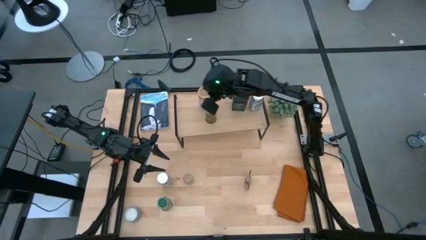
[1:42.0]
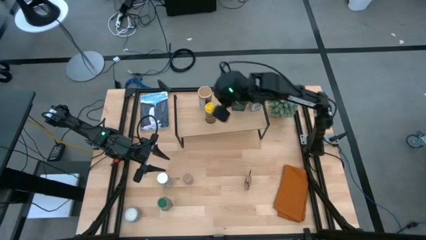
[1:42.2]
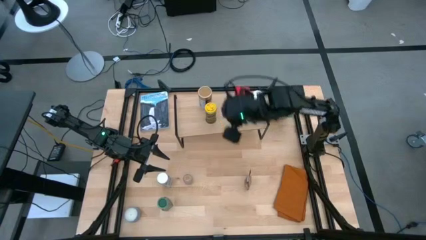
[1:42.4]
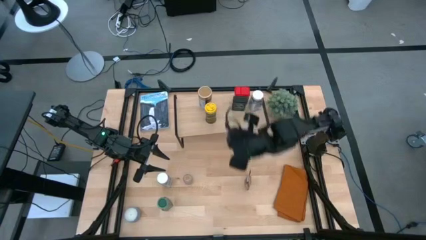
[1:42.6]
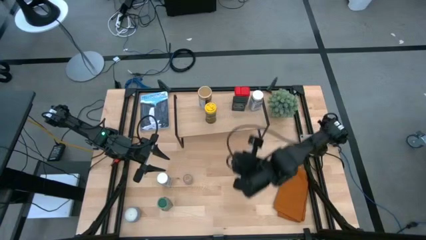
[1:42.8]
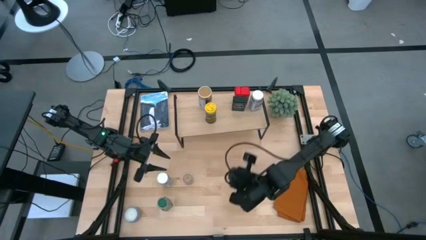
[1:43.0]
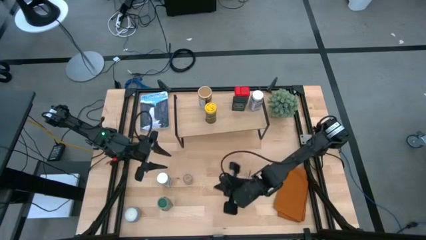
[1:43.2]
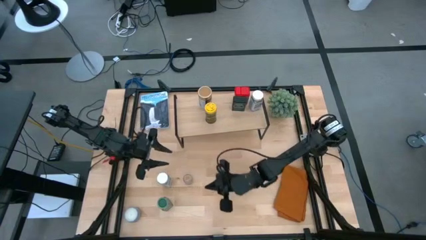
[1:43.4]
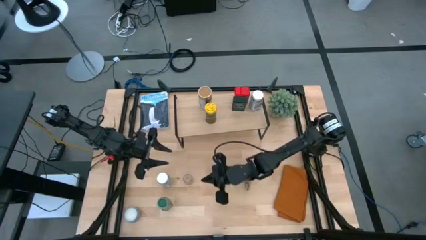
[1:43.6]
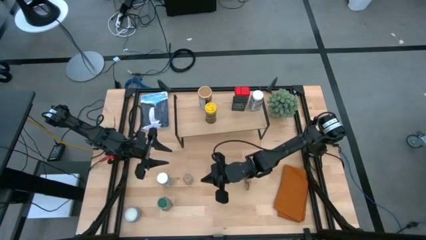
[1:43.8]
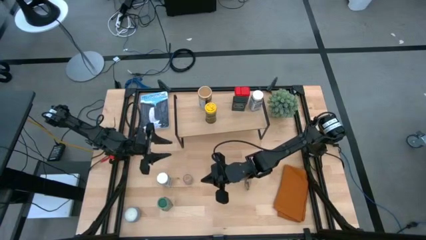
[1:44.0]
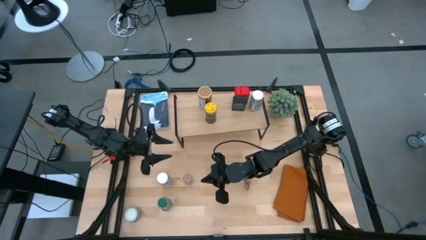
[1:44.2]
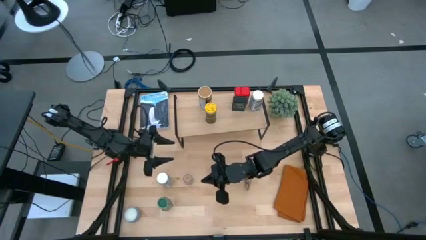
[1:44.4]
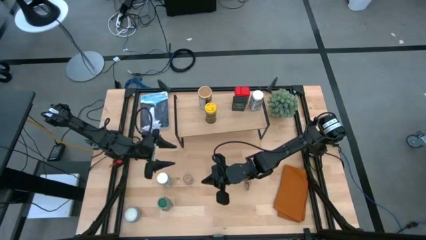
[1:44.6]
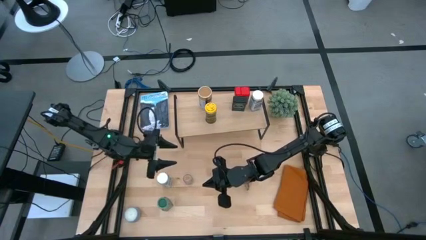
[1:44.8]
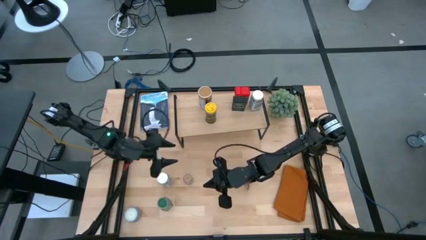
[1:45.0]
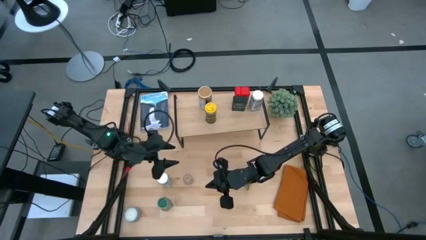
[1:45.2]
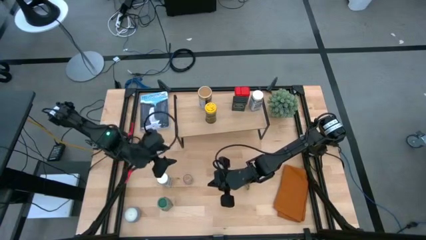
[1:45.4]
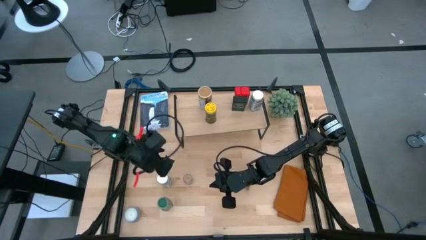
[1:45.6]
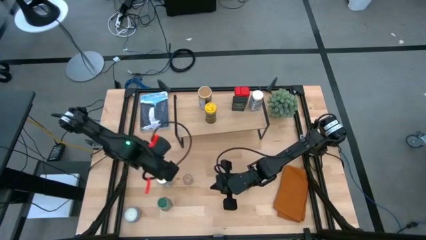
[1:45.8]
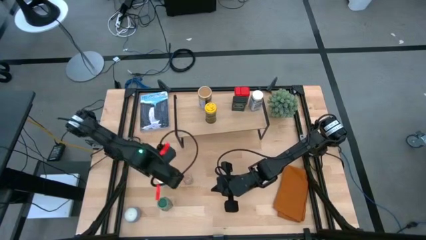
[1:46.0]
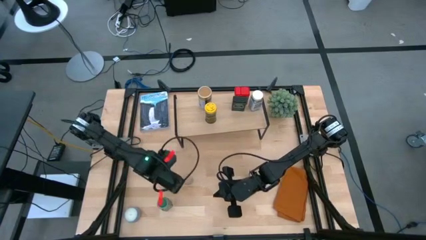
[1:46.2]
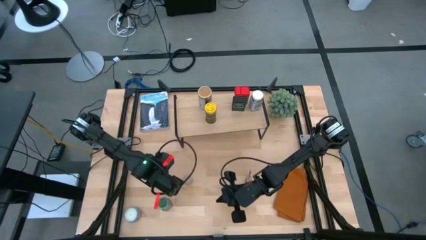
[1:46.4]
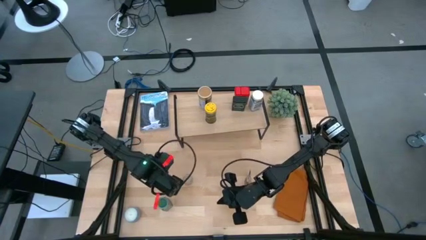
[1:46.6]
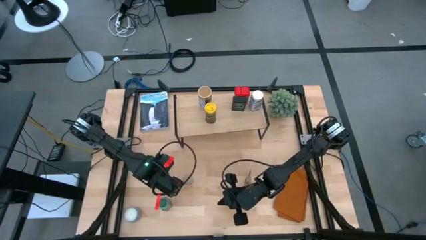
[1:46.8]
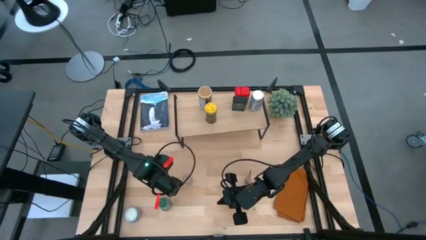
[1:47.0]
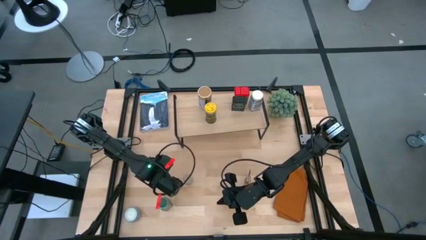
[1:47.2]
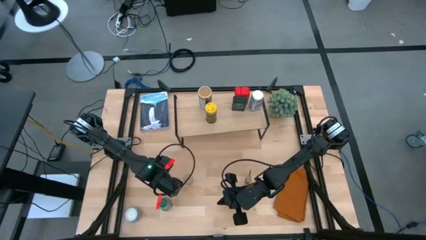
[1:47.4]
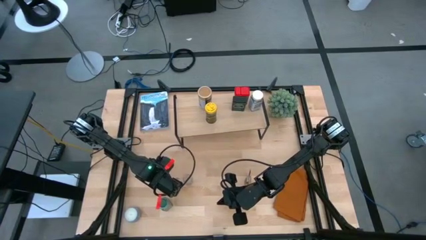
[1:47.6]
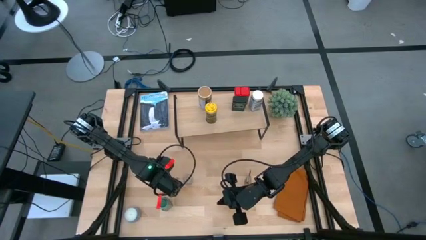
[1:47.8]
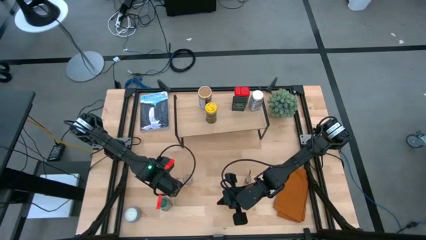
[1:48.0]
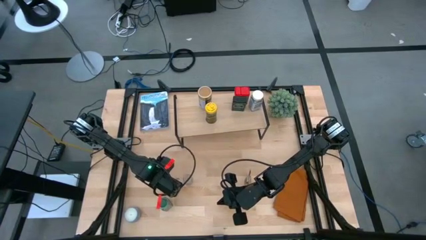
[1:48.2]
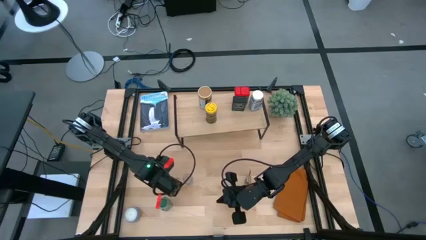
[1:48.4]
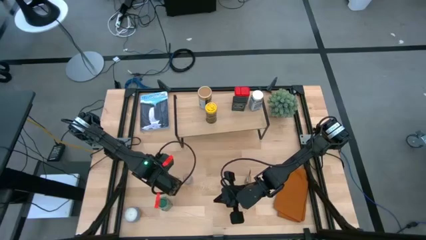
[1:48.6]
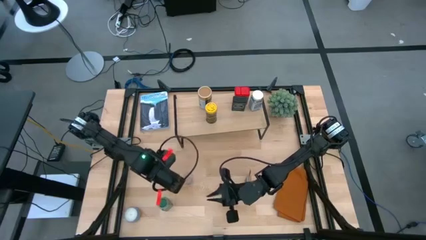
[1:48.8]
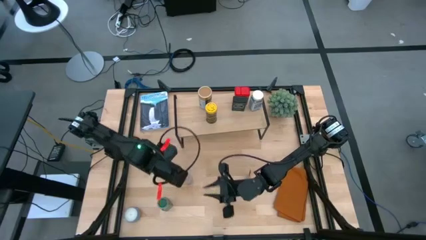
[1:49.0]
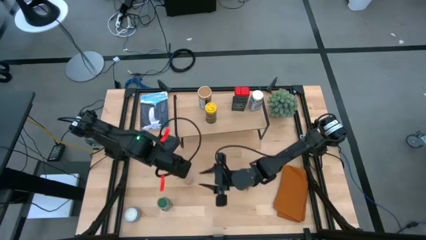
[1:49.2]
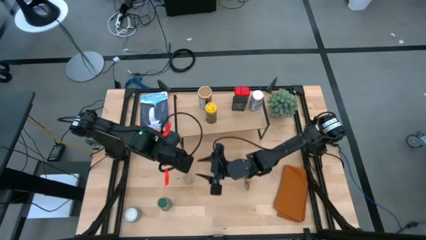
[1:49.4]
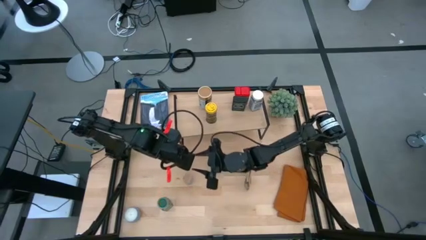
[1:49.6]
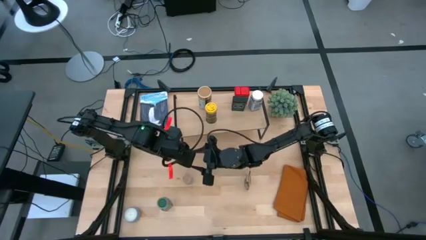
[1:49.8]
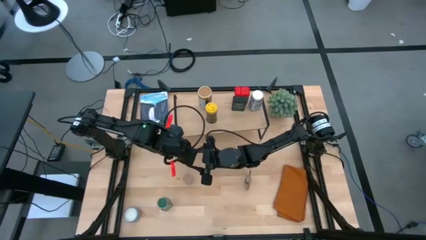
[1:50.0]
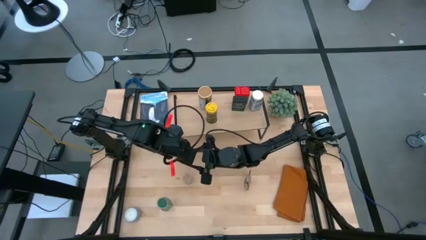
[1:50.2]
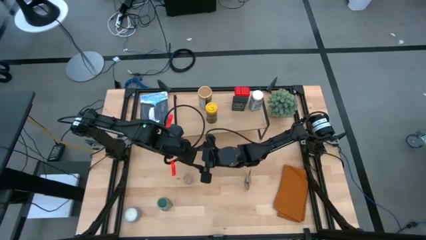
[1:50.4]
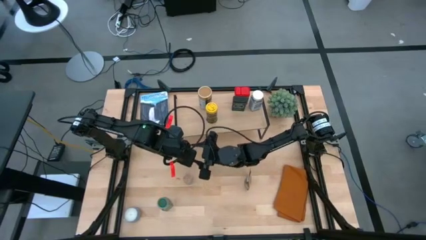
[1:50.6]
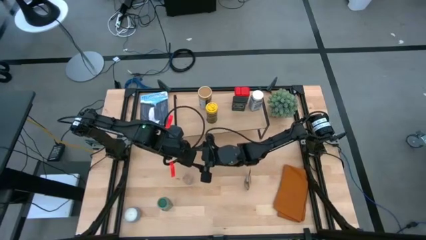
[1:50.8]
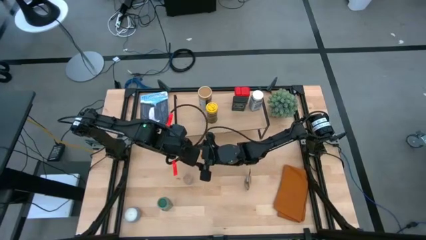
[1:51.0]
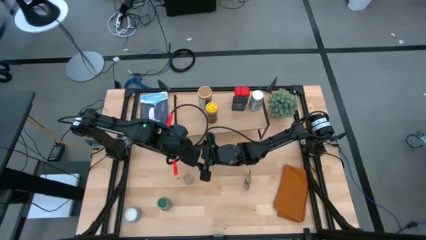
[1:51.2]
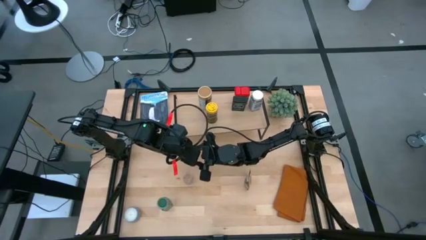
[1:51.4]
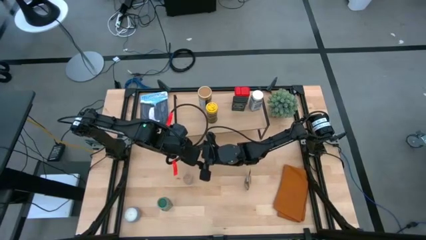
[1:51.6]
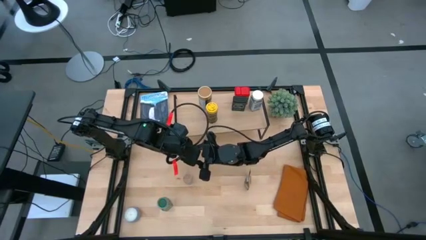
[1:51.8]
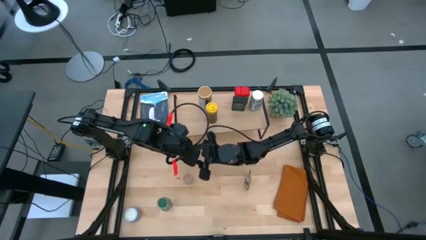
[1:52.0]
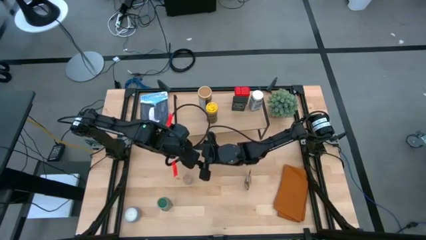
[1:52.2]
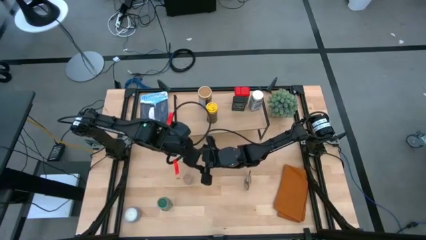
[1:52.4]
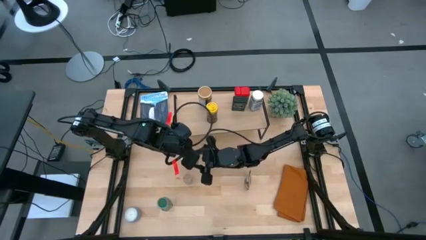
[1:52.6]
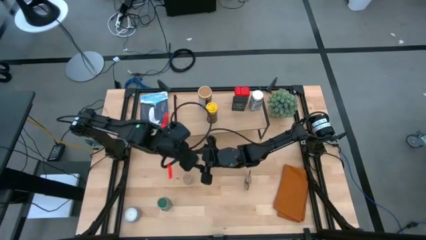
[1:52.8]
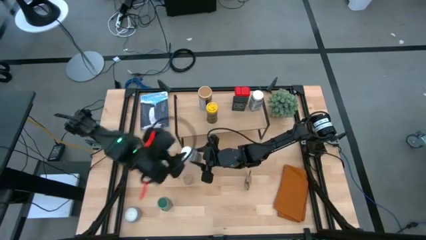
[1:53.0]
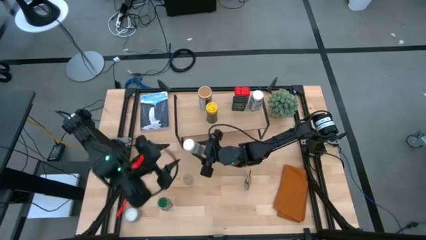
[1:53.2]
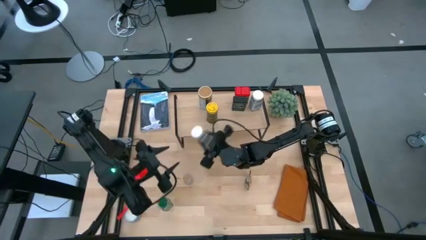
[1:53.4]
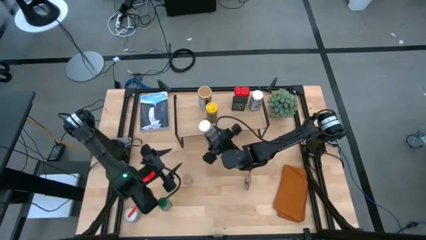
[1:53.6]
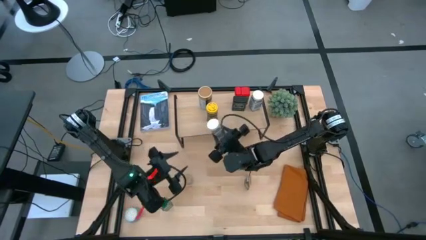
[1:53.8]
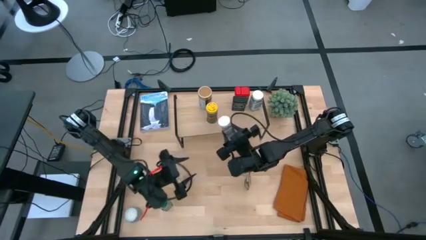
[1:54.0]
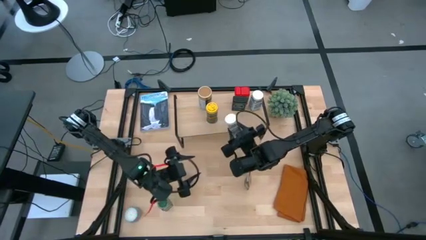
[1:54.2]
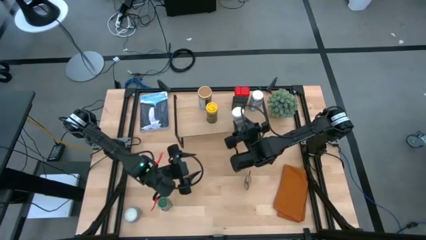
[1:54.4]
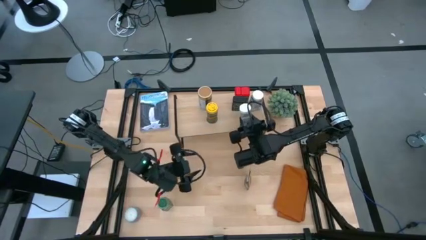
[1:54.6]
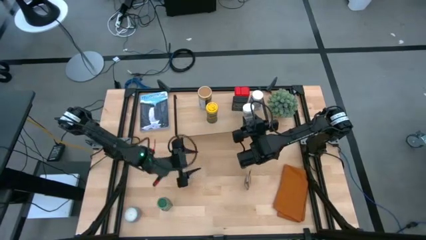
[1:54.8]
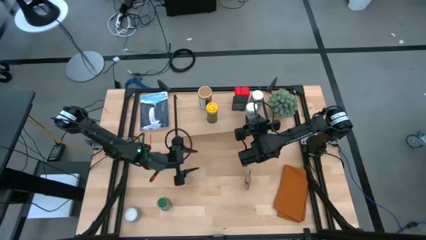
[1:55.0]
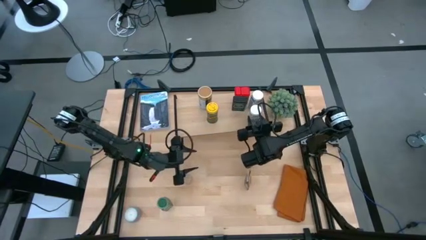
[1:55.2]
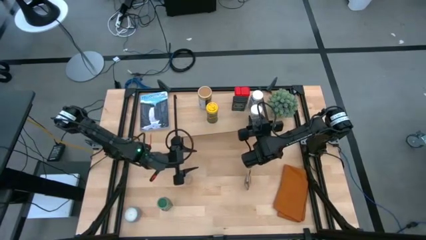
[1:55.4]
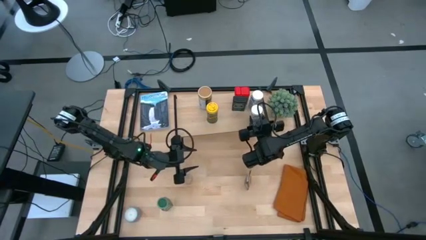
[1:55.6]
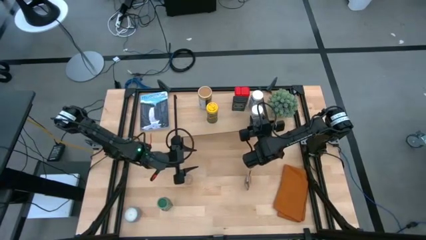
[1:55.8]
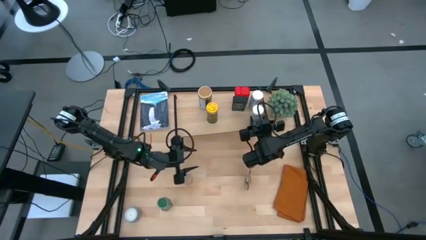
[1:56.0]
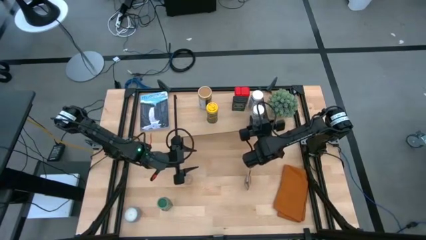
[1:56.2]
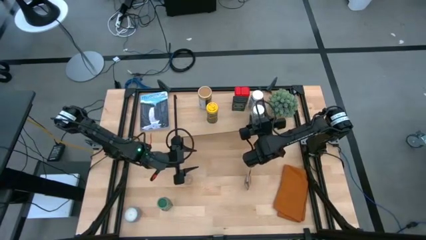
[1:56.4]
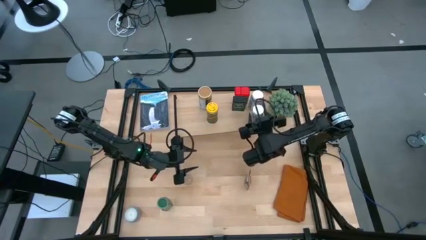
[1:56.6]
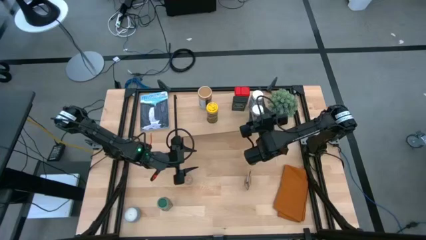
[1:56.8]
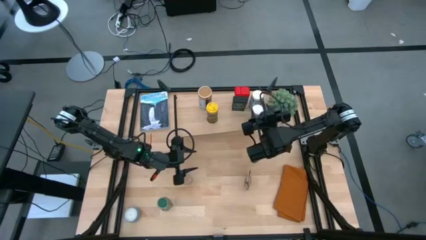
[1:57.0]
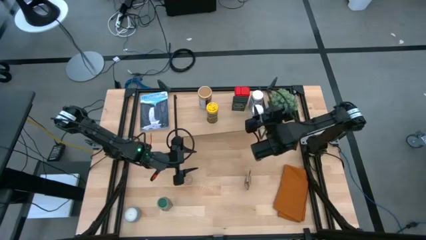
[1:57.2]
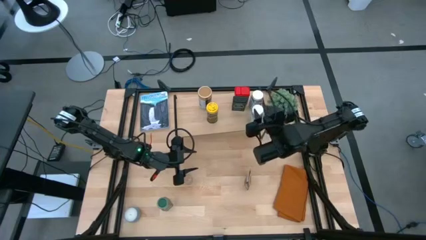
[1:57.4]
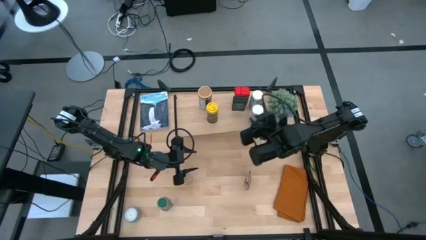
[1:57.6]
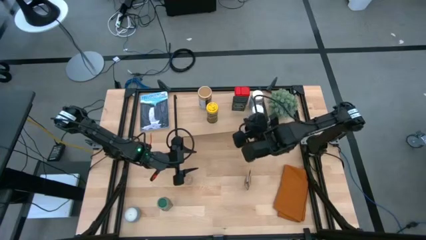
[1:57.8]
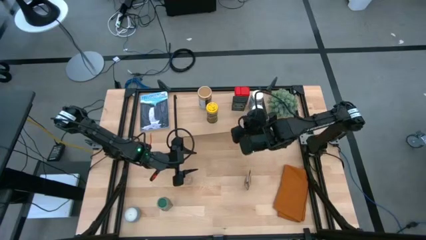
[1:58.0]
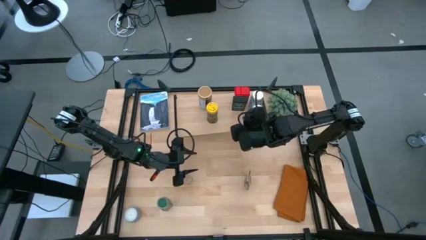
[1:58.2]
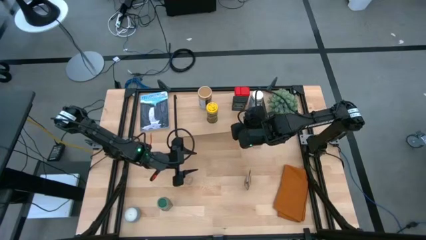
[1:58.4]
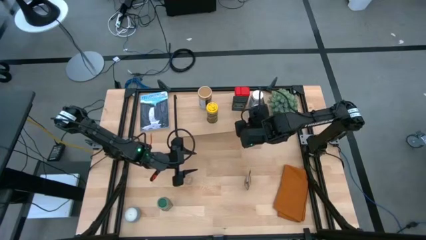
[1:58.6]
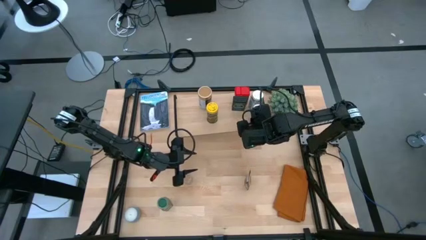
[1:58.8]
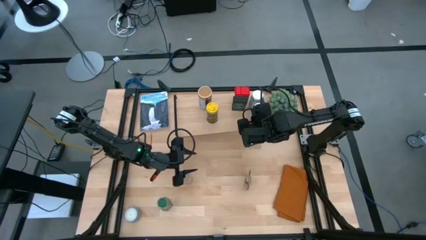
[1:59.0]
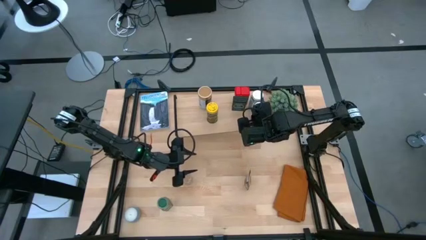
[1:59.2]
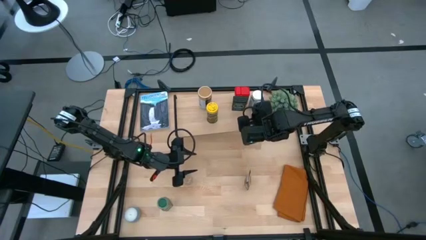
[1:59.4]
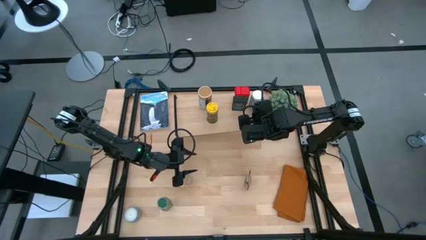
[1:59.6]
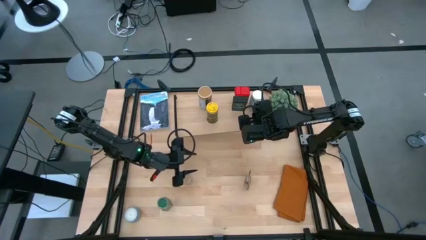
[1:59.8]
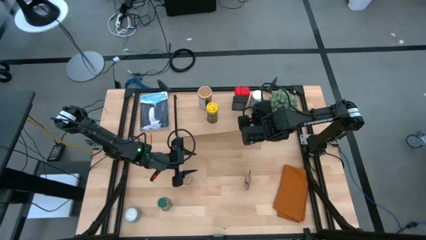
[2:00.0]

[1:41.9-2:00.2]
Task: Shelf spices
Put the white seasoning bottle on the shelf
